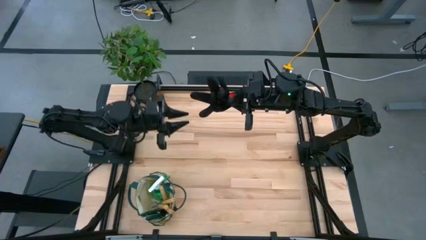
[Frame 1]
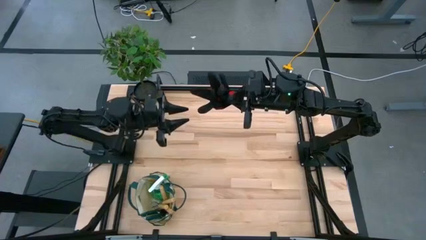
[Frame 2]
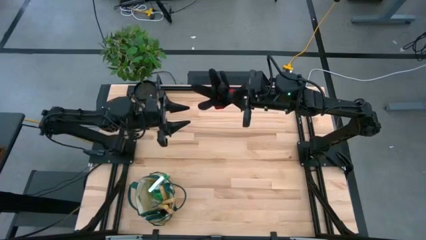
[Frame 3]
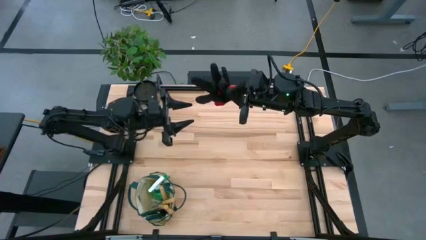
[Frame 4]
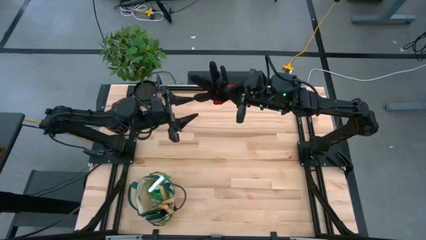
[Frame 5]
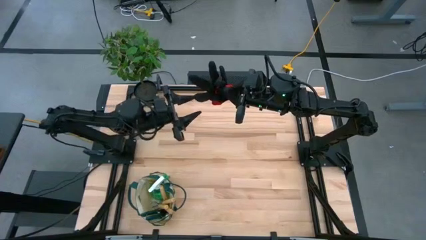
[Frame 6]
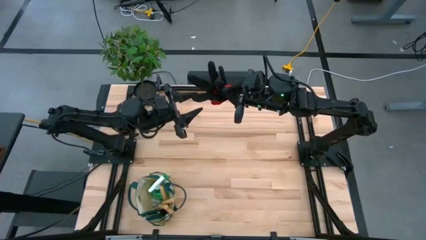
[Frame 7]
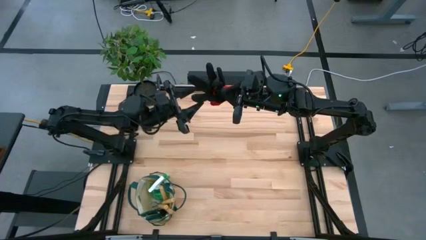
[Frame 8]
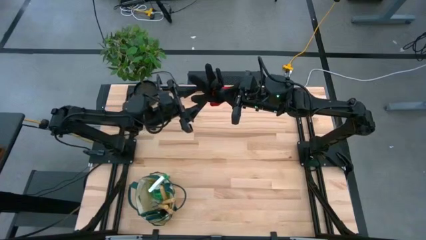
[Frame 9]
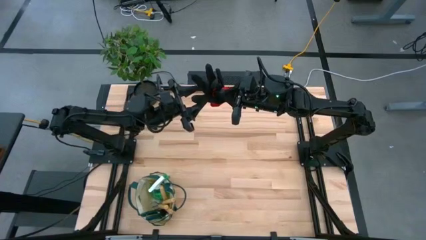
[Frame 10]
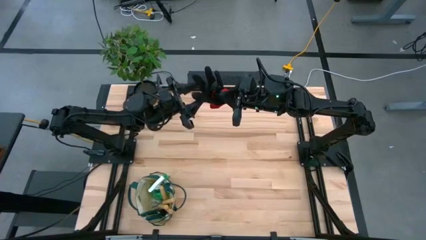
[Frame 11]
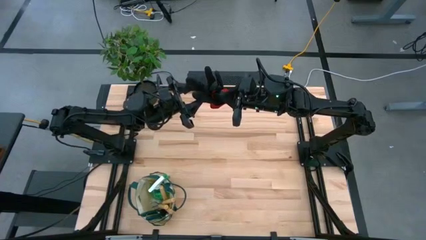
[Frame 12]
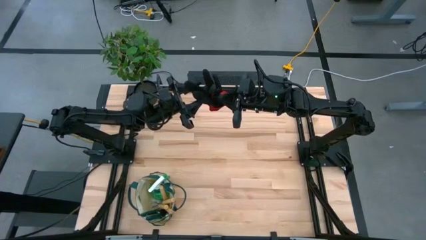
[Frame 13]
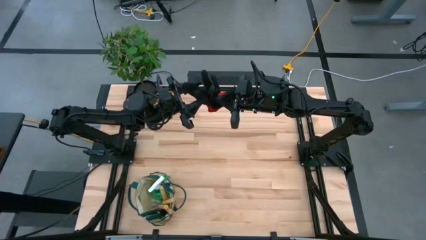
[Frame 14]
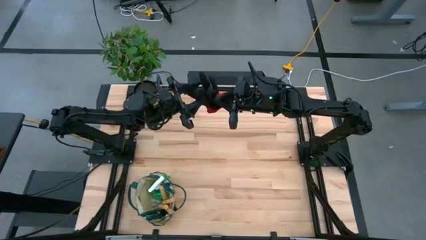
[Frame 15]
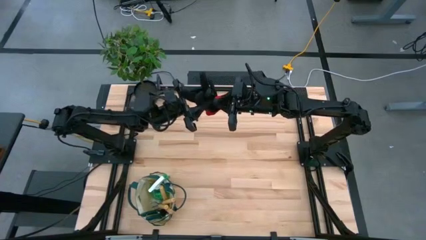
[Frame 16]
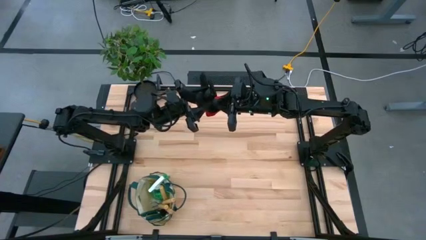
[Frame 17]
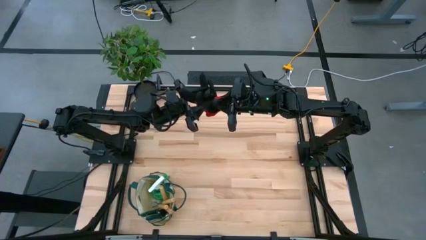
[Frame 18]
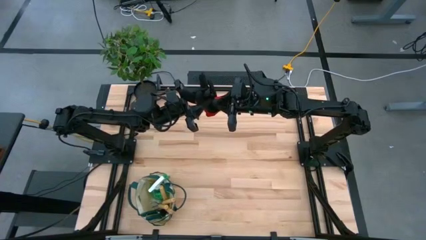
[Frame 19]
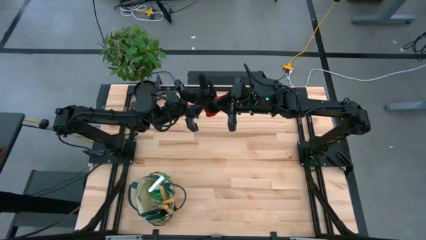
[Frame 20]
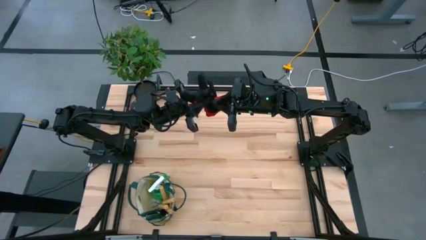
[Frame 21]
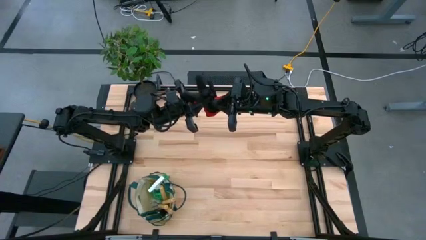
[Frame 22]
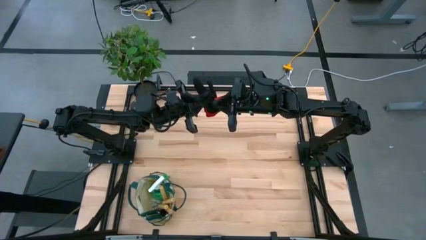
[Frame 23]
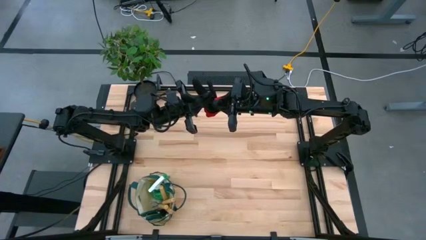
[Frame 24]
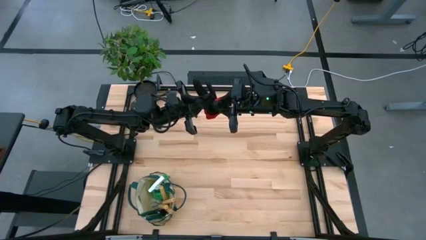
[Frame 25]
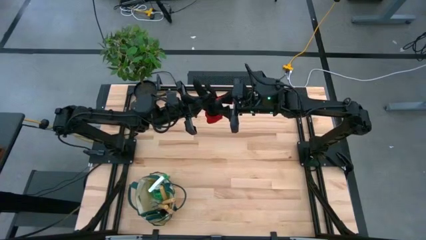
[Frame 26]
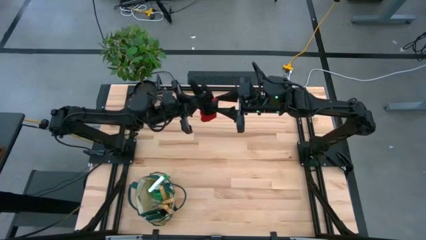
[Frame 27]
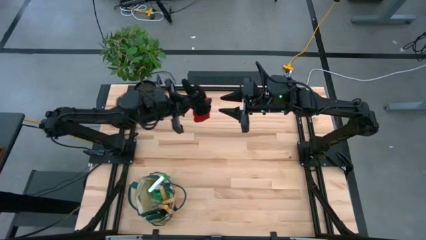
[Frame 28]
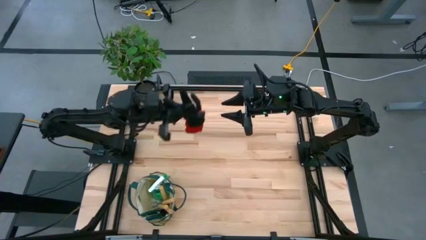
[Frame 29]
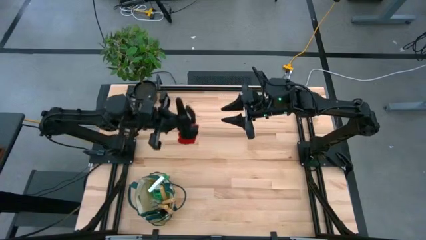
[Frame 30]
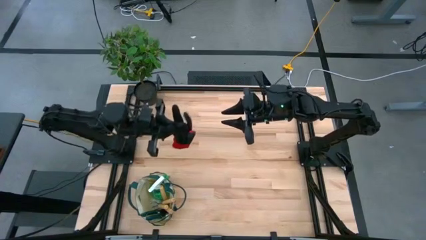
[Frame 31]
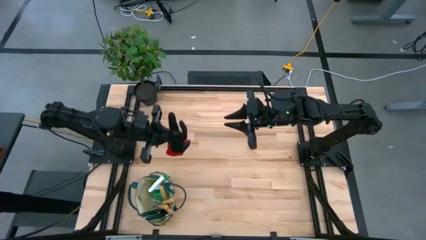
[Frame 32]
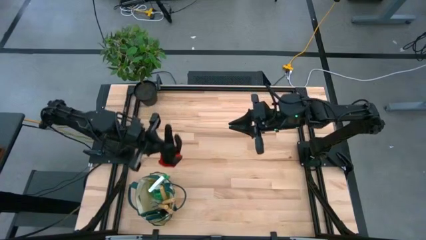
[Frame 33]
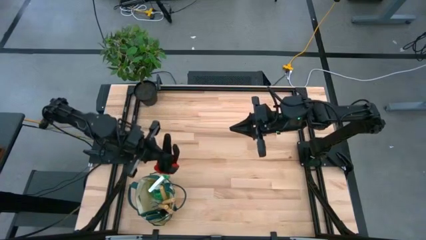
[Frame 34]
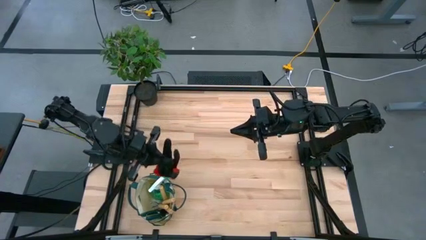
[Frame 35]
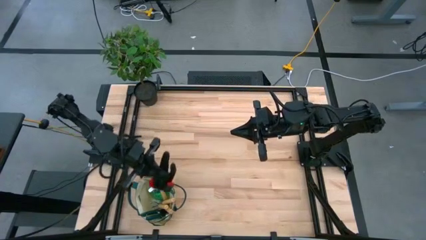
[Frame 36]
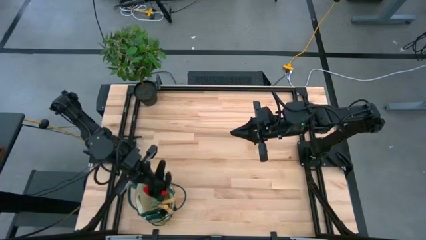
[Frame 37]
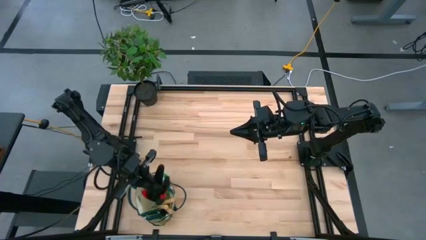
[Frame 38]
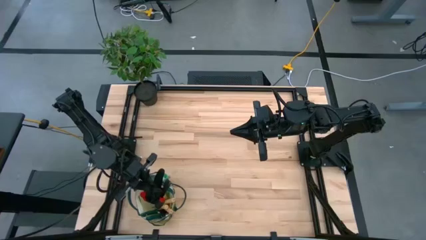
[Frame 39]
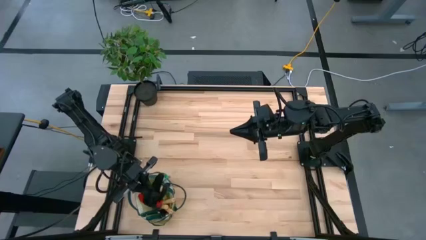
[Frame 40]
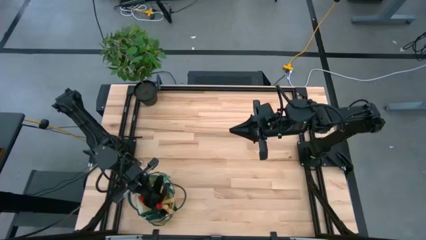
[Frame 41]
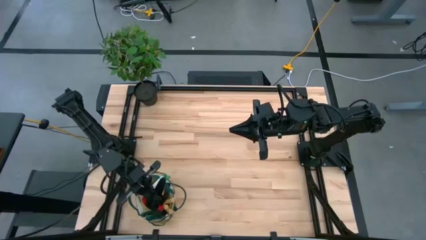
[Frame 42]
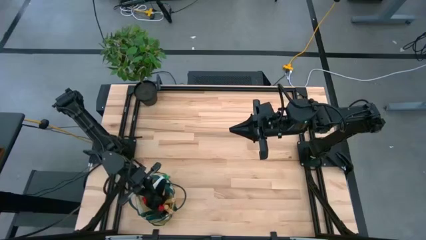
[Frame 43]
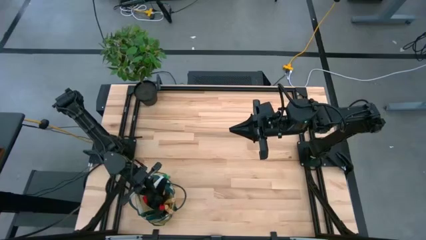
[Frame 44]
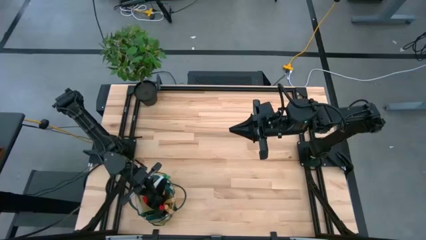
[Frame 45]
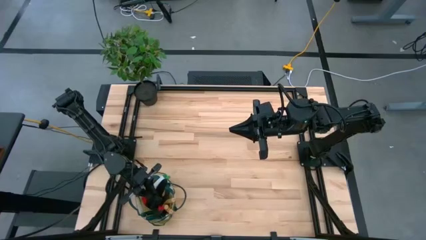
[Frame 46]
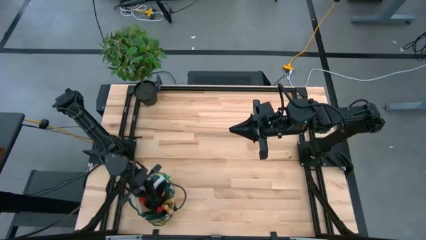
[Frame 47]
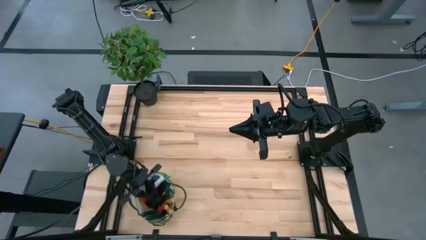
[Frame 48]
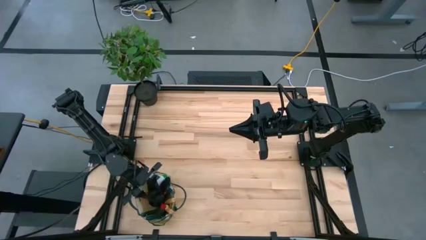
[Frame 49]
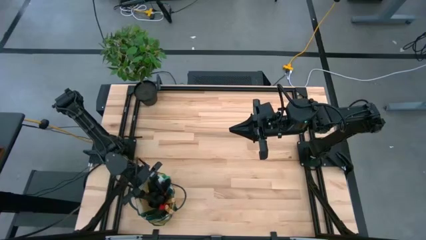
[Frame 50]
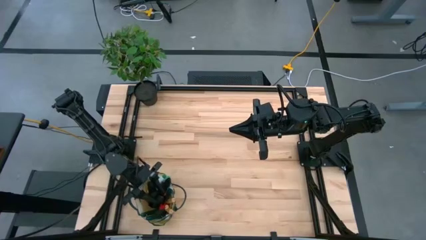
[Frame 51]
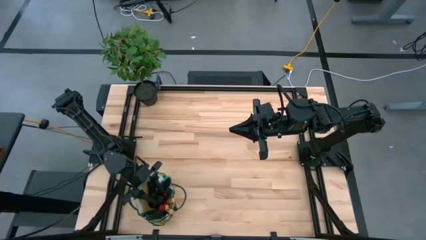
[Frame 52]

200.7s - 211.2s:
Task: Pick & Place Garden tools in Gardening bag
Put the gloves into the gardening bag
